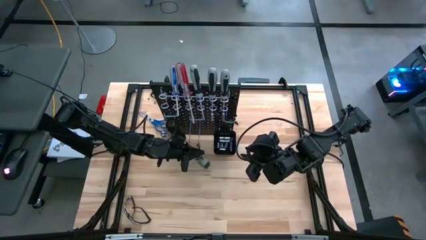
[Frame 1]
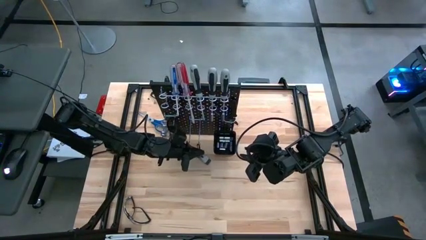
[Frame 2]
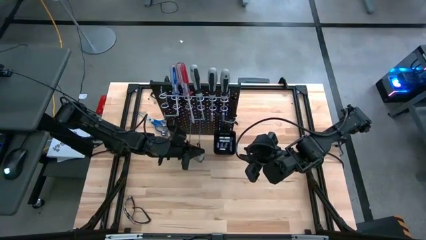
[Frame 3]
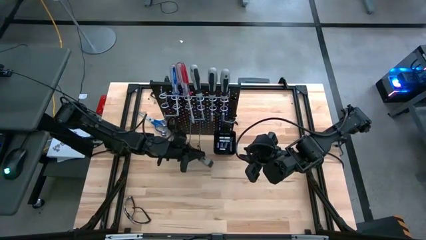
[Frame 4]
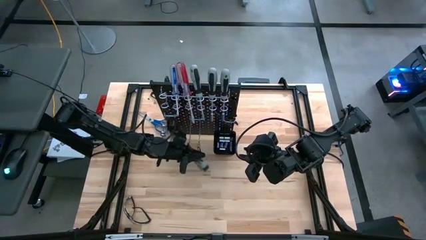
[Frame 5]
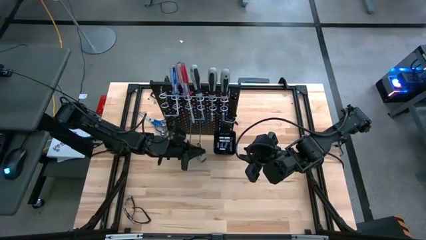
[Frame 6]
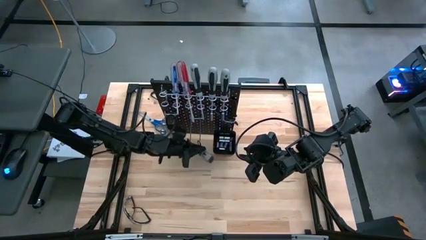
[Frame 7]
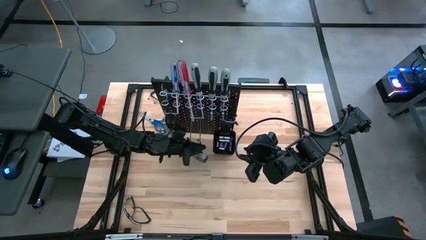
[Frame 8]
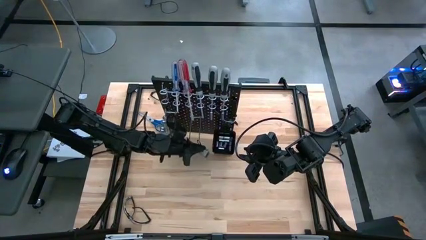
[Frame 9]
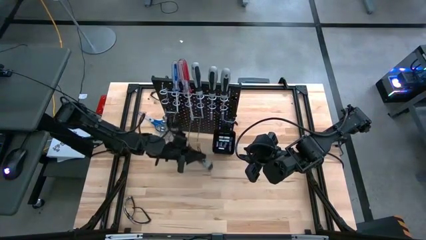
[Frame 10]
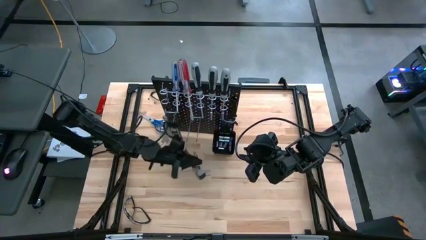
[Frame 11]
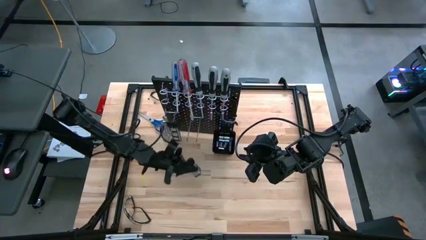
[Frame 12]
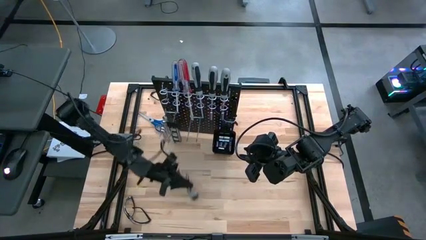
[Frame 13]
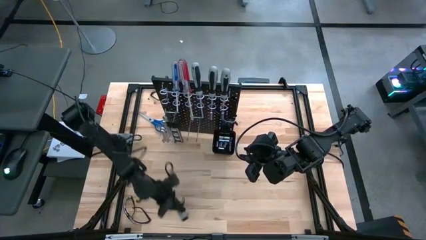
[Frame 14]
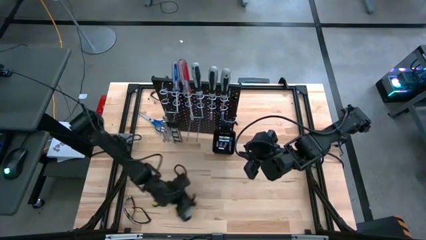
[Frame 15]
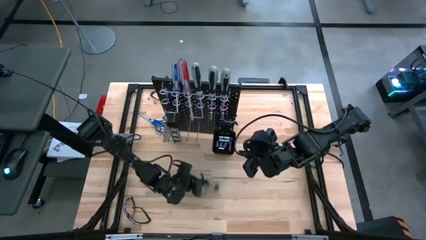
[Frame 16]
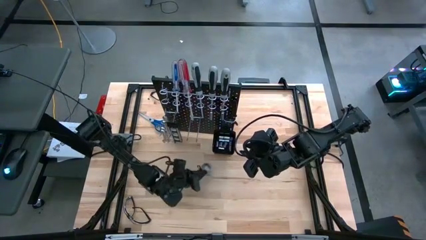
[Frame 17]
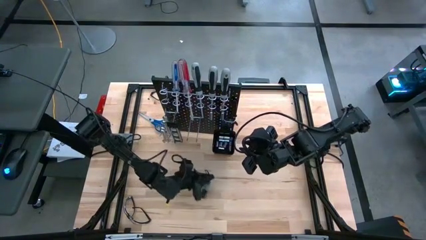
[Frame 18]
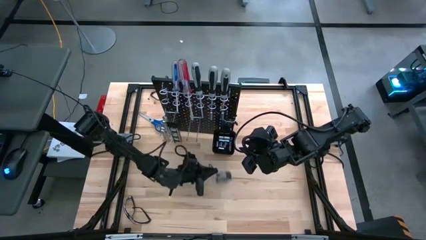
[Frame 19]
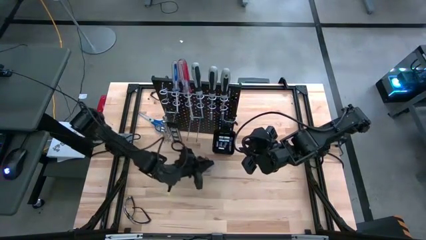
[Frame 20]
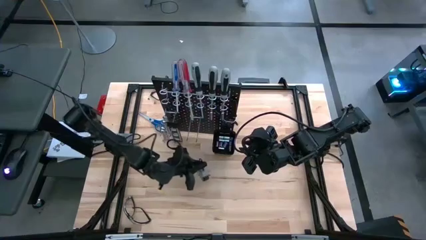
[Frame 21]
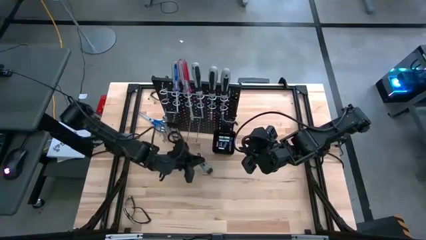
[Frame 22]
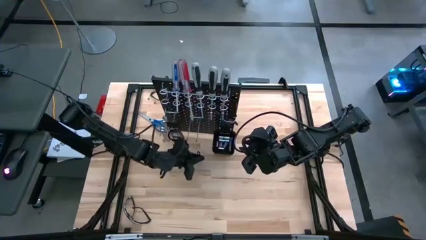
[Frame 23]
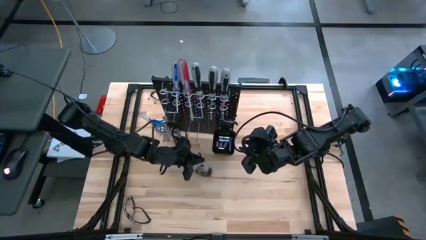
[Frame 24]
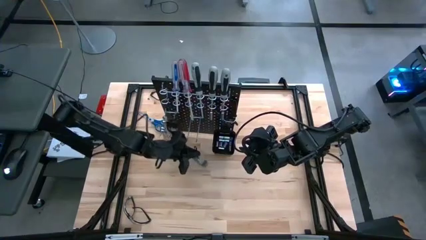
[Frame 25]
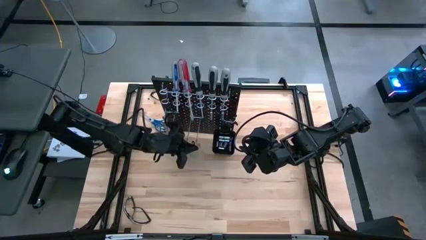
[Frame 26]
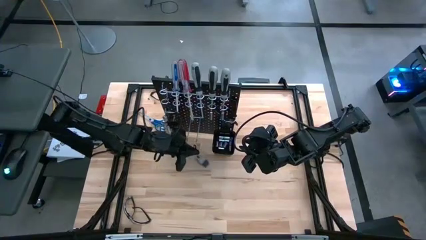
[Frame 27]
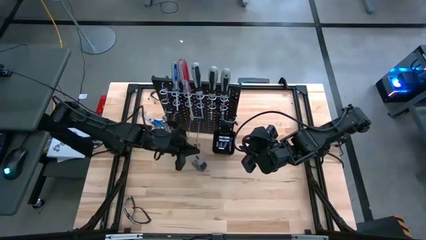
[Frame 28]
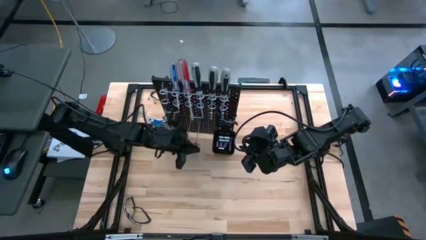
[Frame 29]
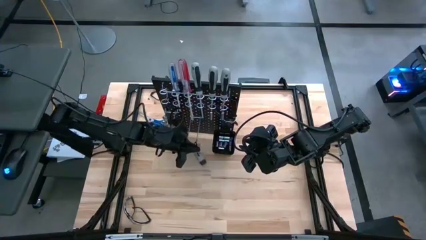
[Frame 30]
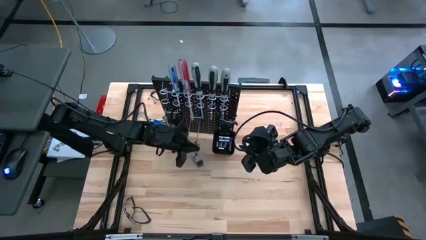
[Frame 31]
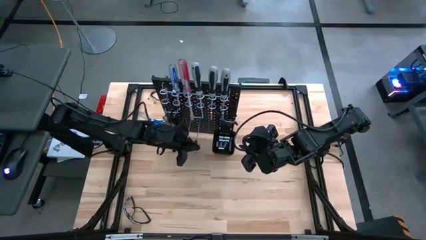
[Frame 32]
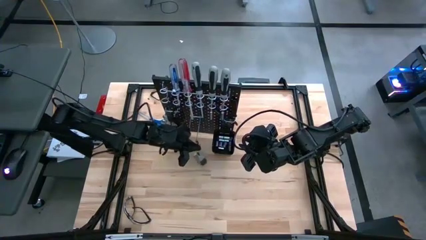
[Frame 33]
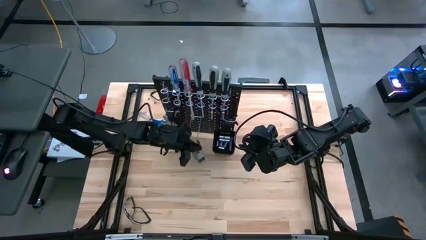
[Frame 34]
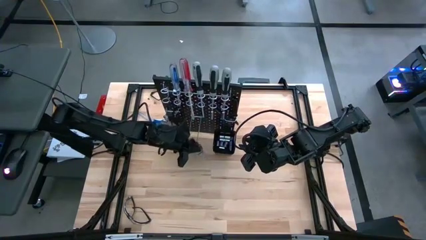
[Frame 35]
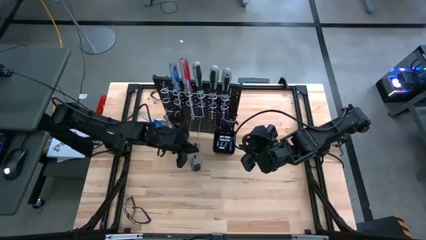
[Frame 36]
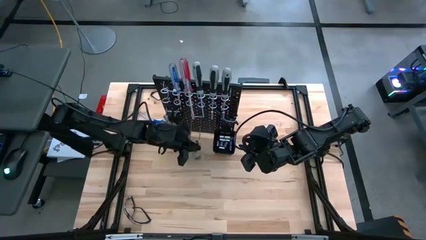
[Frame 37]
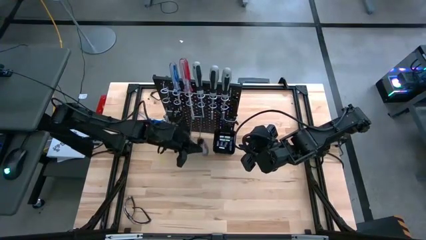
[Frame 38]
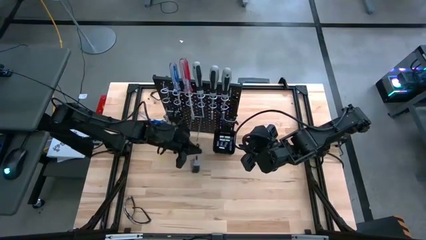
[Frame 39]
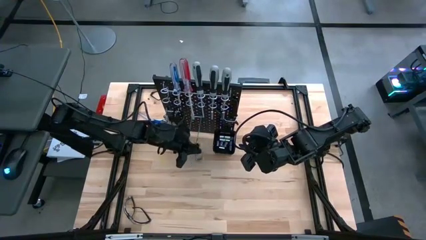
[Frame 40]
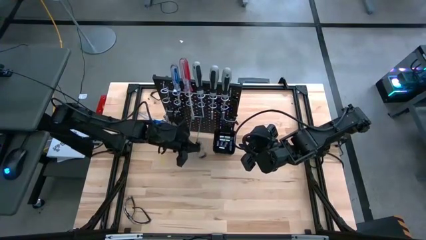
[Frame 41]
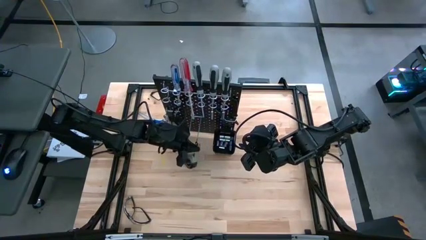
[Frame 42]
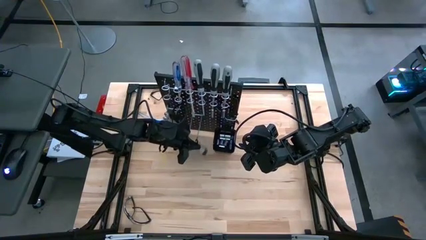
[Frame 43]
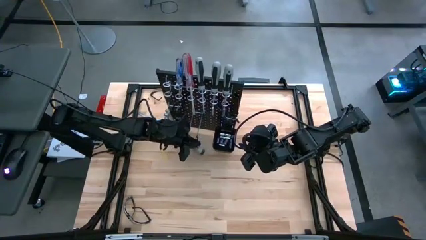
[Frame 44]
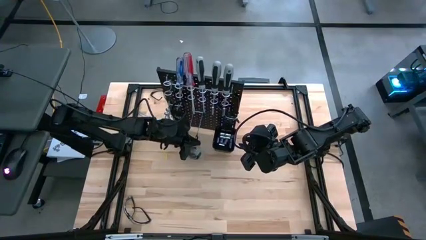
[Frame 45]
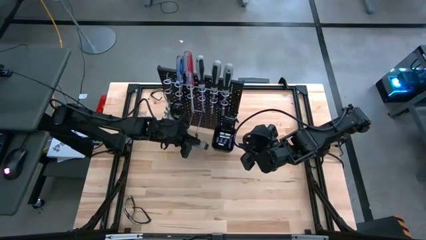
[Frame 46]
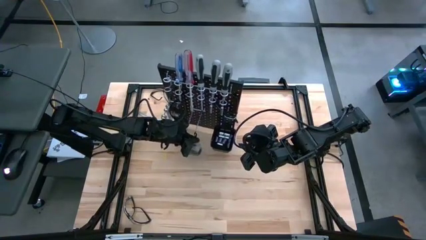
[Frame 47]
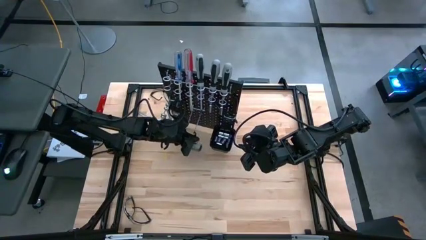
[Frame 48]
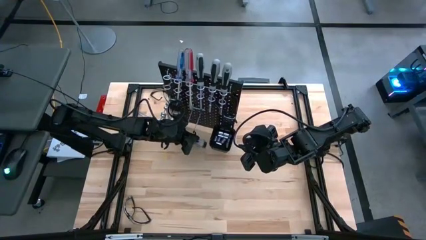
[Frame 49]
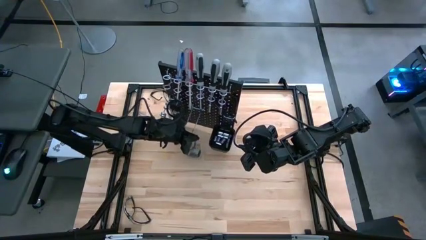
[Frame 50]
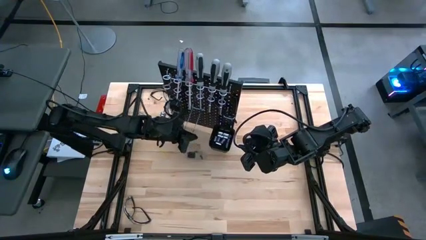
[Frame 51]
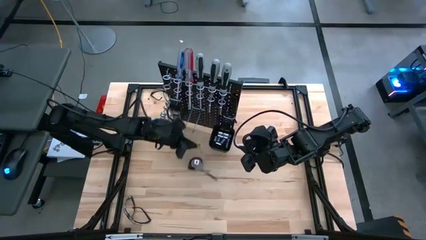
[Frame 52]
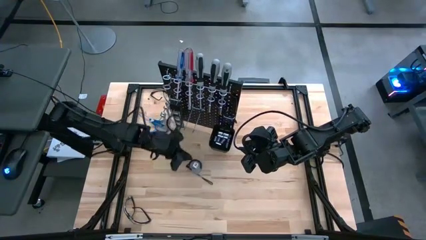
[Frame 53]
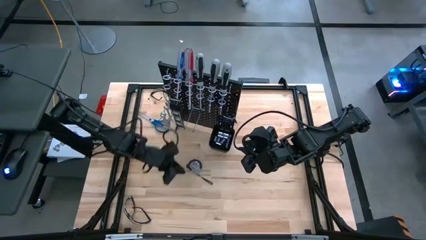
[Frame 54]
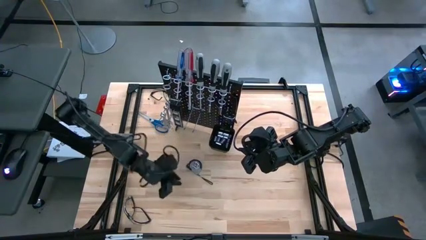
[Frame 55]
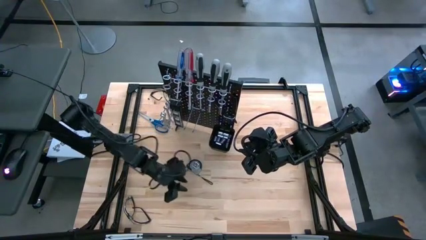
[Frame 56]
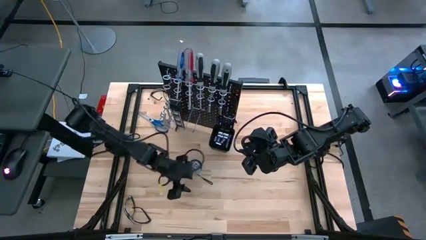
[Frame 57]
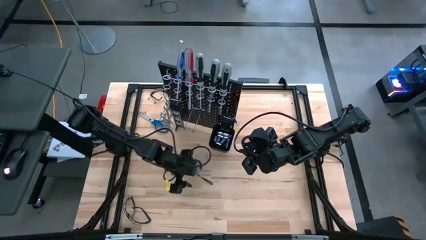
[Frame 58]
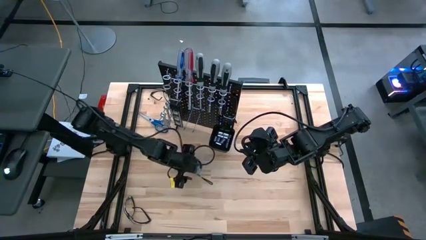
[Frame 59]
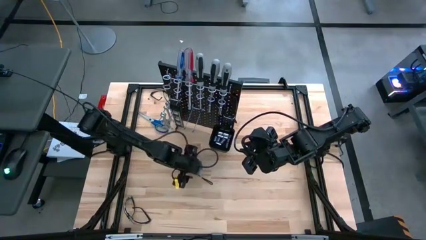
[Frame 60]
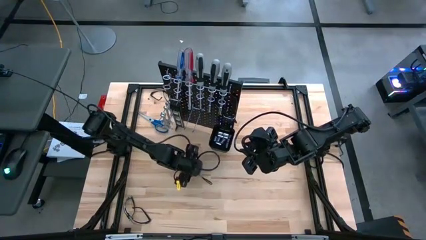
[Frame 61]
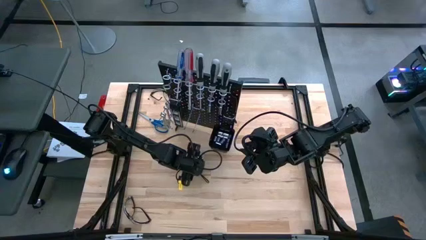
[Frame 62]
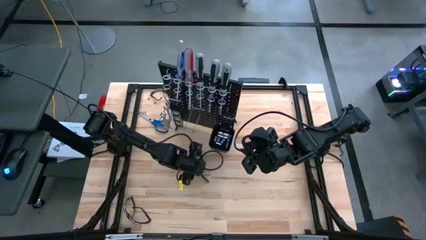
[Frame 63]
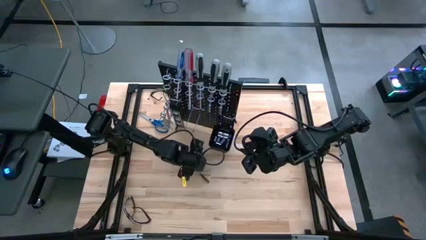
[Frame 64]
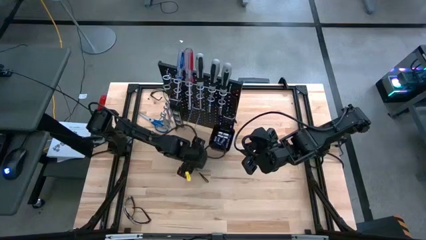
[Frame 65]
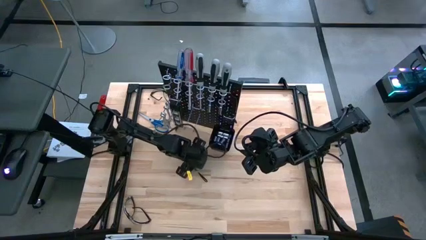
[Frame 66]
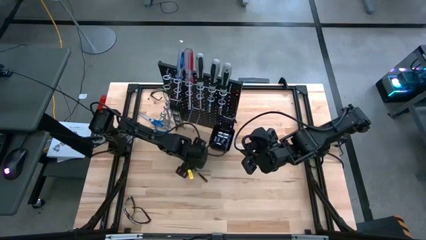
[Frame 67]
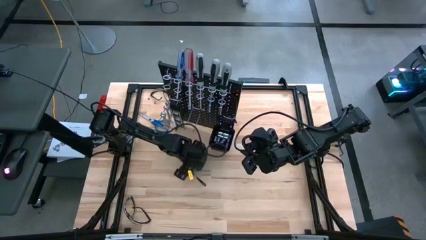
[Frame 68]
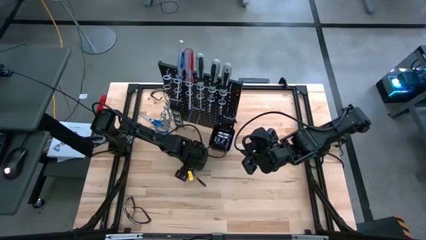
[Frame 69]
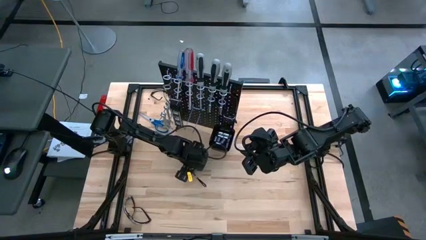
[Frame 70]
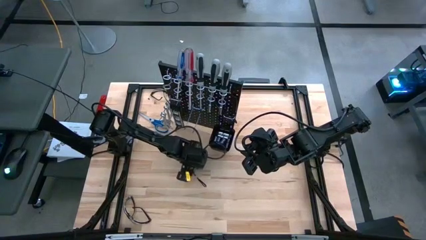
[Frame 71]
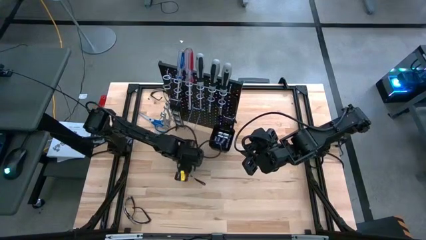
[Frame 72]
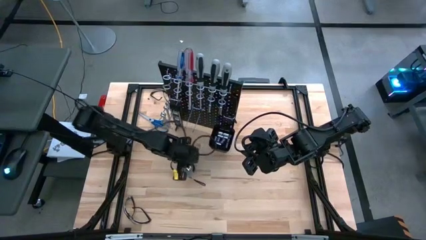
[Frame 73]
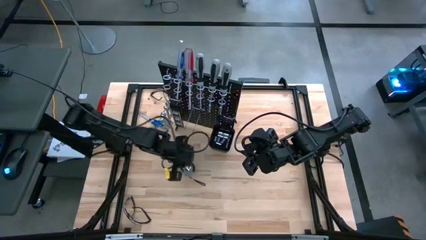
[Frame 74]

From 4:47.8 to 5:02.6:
Task: Hang tools onto peg board
Hang the gray tape measure on the pegboard

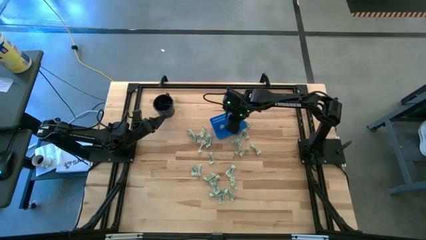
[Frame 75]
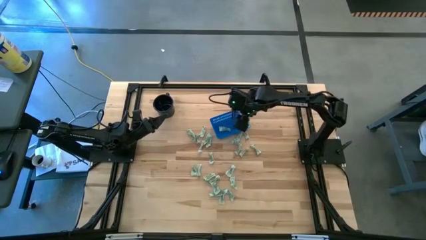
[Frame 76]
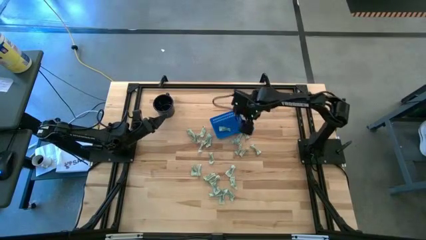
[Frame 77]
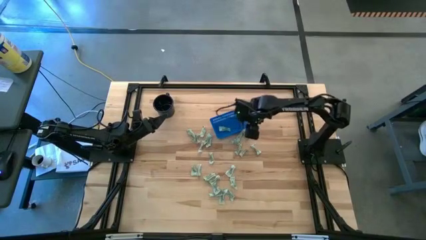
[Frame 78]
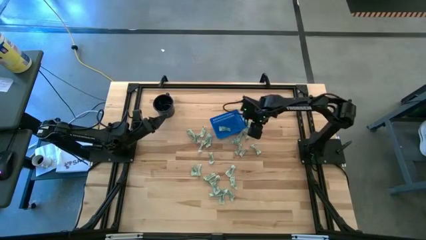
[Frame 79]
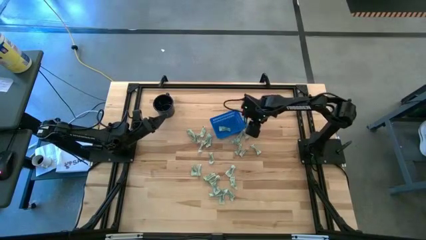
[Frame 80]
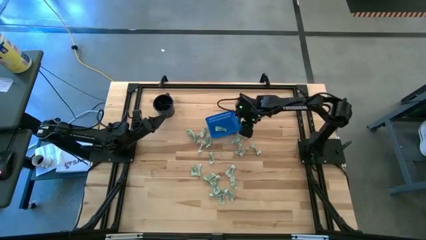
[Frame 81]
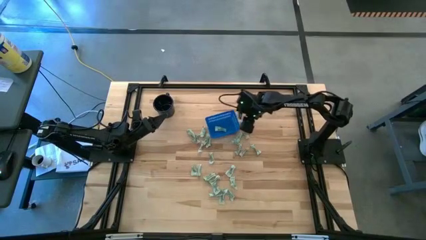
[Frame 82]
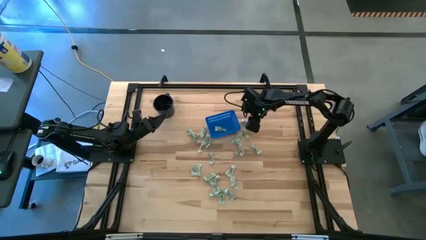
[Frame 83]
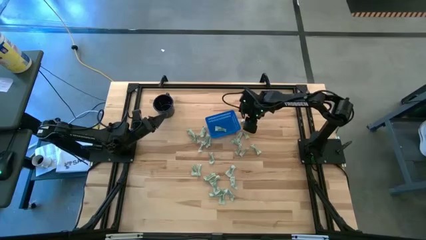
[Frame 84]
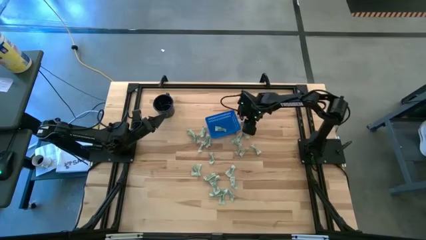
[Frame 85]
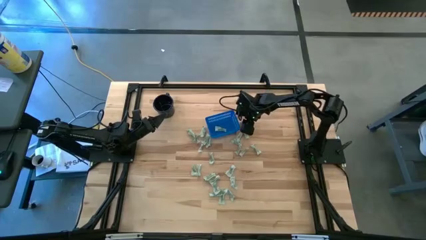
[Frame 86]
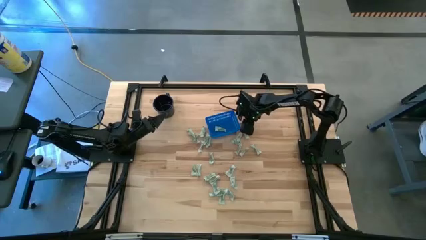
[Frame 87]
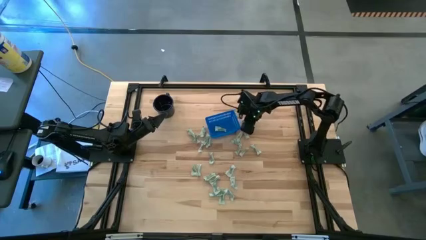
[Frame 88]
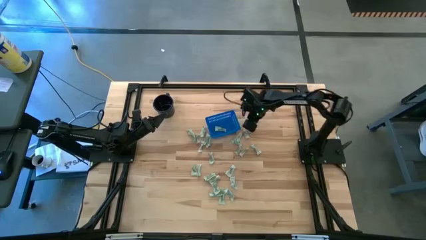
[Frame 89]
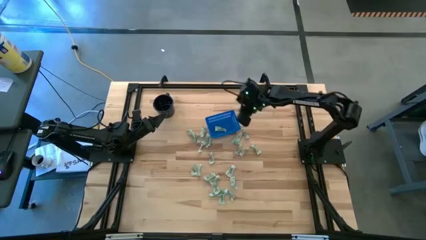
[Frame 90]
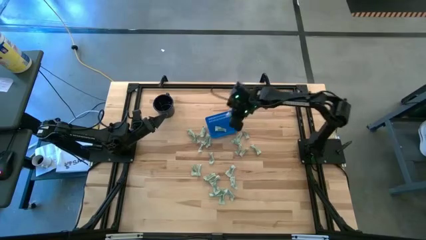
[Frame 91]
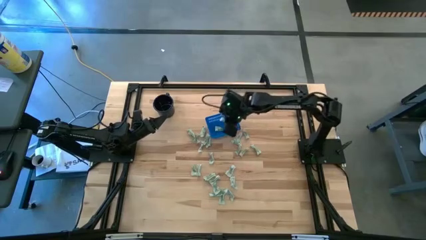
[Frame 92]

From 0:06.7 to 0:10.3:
Task: Pick and place Stevia / Truvia into bins
Put the green stevia packet into the blue bin
